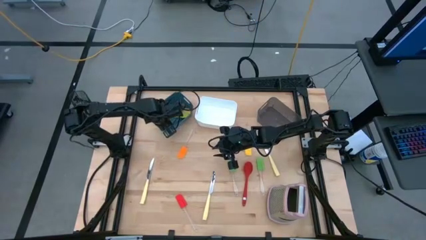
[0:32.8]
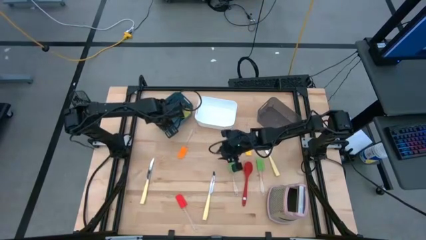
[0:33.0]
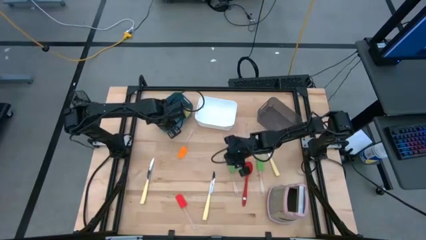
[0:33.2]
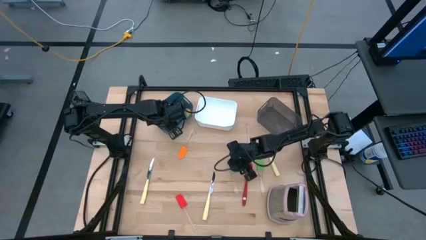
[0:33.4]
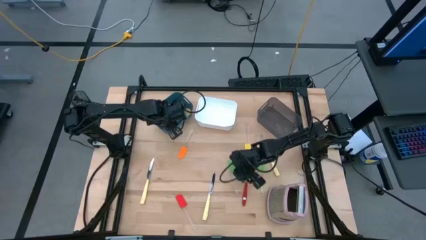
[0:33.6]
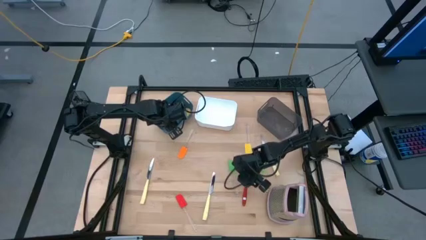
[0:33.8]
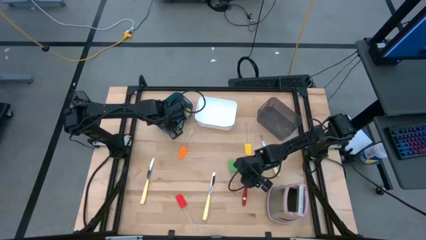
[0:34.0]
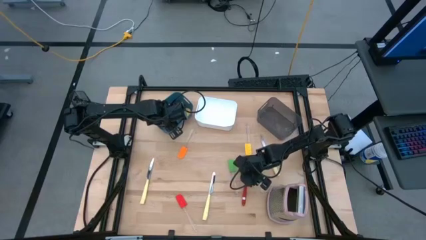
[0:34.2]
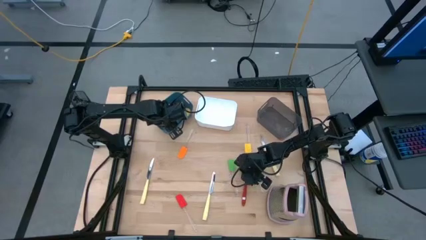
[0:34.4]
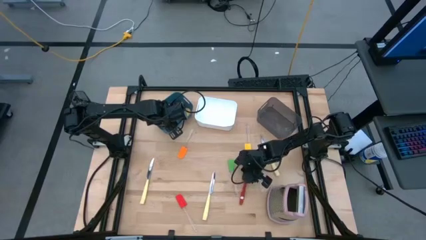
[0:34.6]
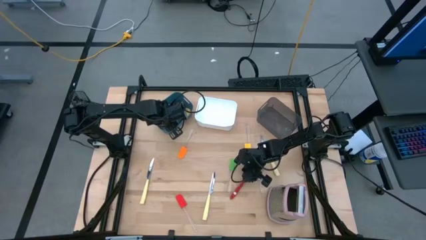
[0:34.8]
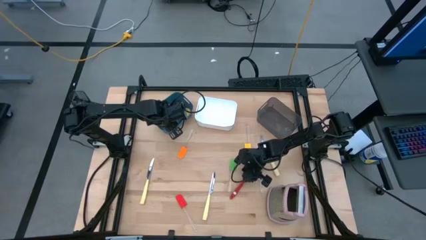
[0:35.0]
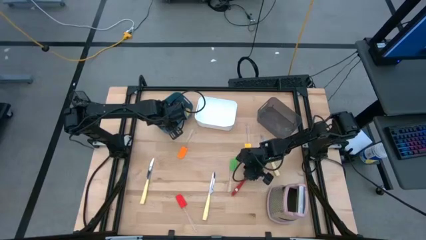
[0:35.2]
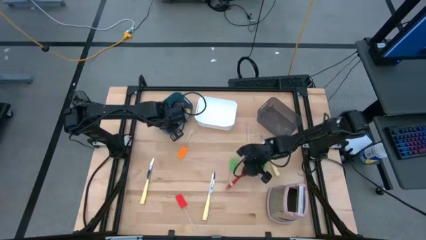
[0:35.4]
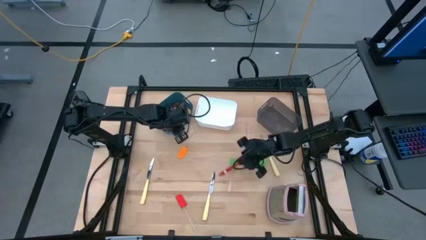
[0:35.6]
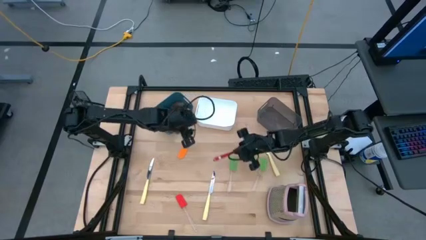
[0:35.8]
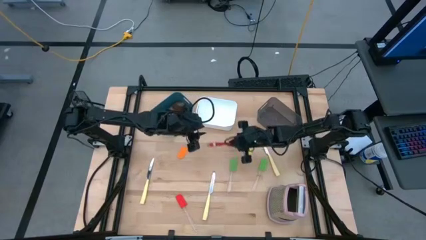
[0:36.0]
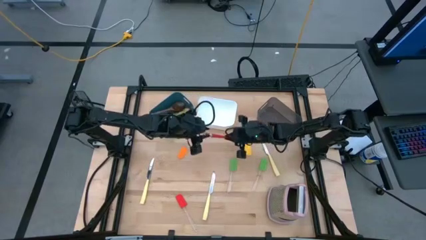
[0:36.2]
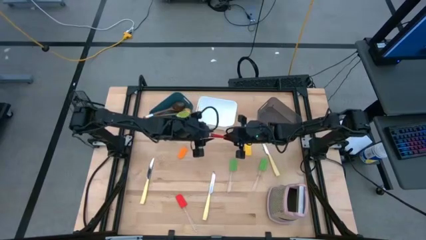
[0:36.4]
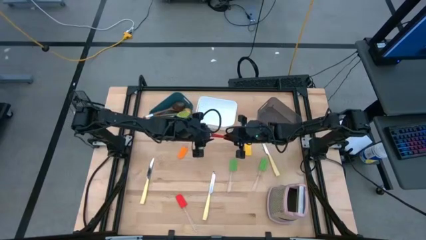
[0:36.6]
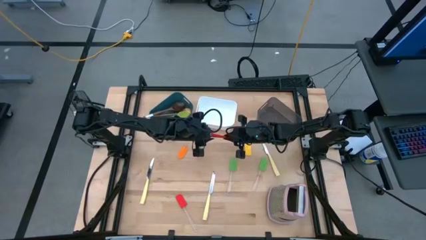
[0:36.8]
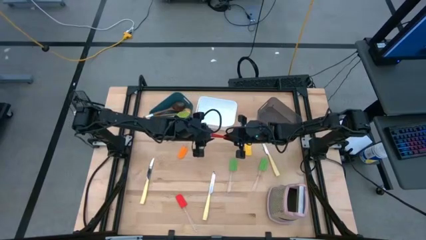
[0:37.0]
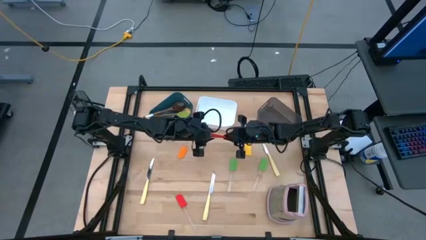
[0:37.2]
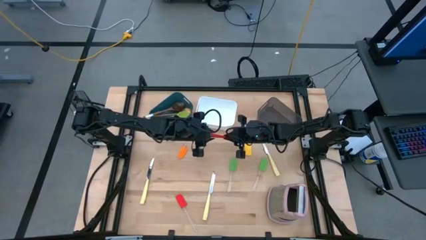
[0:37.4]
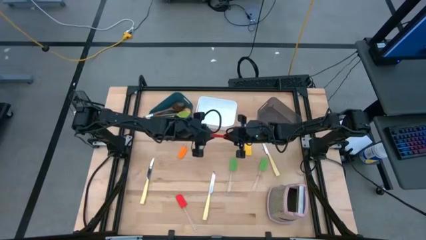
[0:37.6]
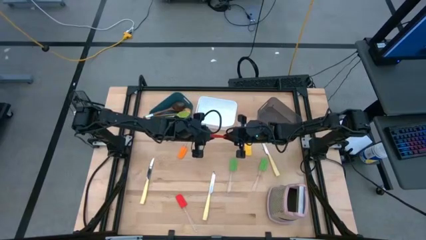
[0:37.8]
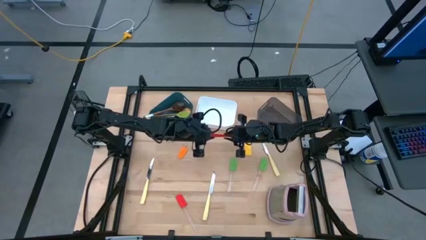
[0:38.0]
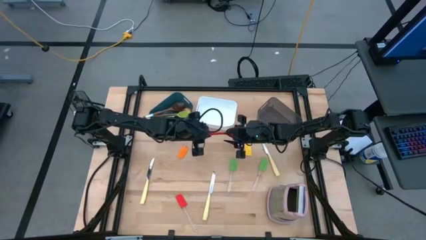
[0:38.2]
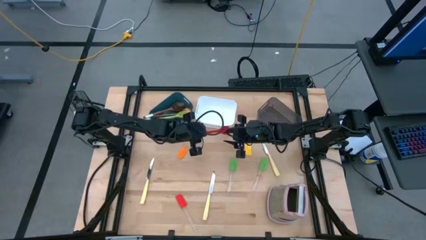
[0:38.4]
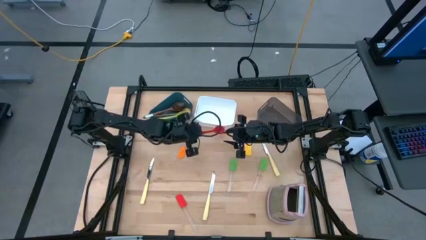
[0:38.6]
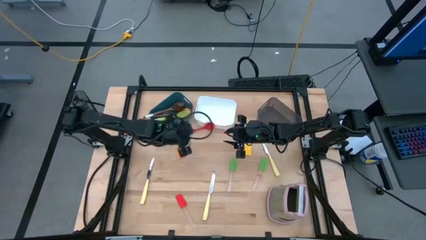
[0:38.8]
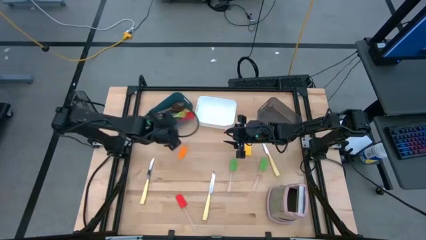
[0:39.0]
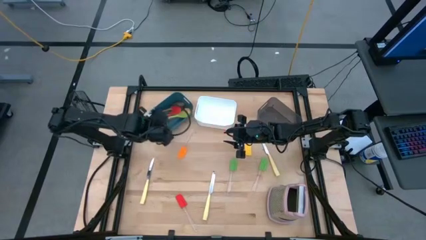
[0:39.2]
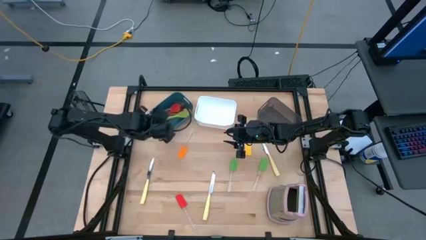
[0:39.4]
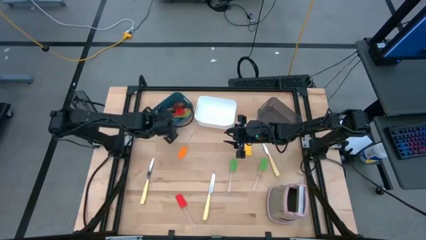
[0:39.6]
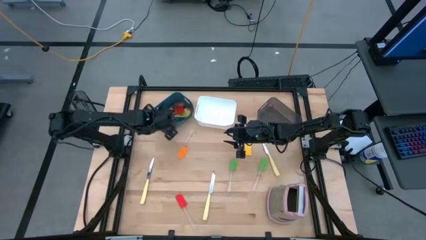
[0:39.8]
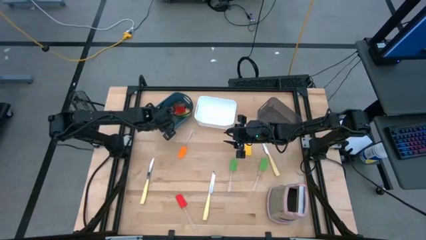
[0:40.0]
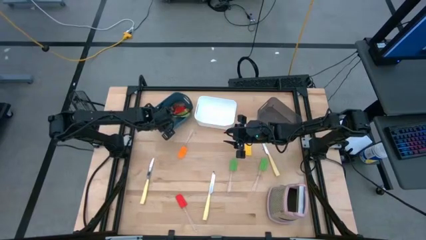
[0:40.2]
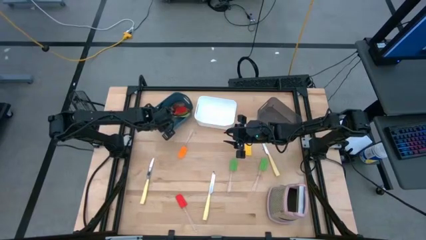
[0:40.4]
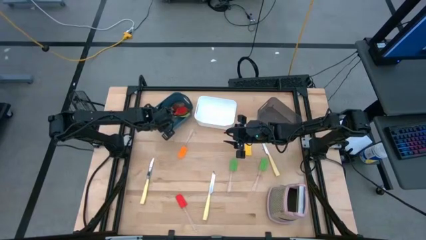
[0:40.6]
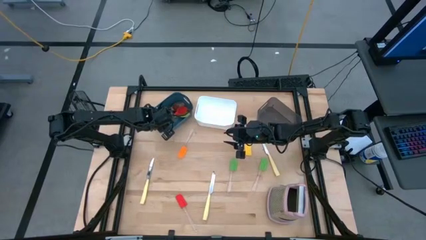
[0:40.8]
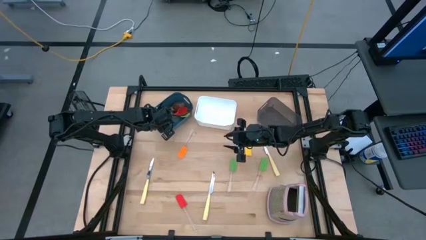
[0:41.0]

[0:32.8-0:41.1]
Task: Pick & Place Kitchen Items
Put the red serving spoon into the blue bin

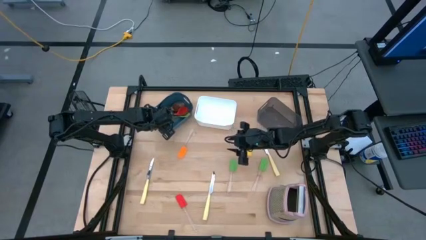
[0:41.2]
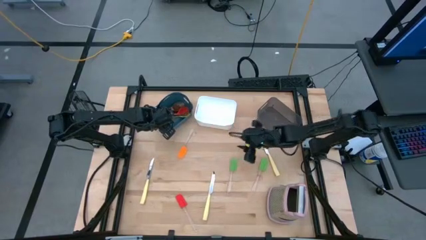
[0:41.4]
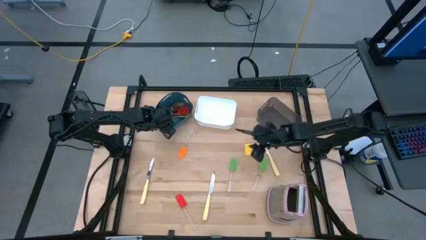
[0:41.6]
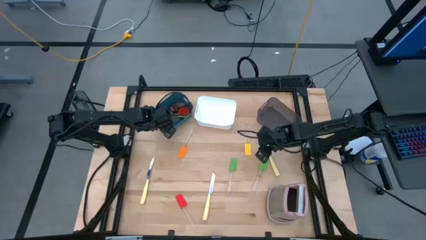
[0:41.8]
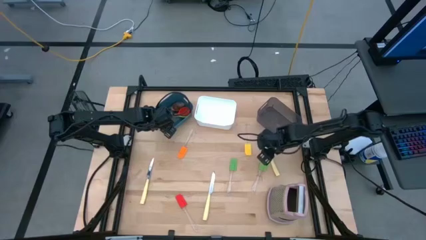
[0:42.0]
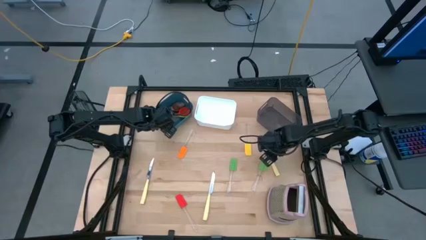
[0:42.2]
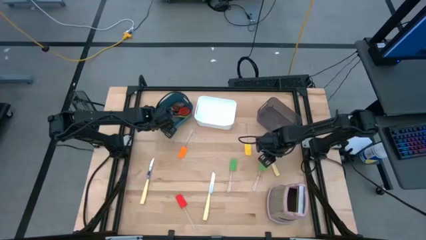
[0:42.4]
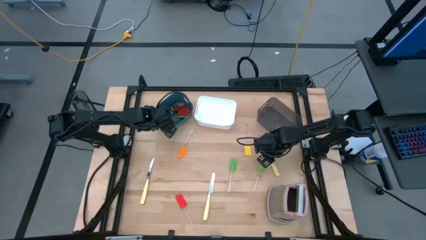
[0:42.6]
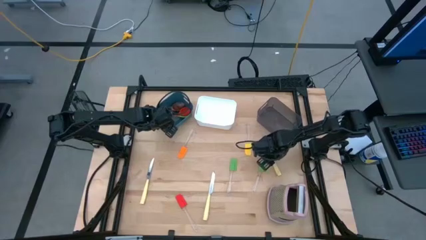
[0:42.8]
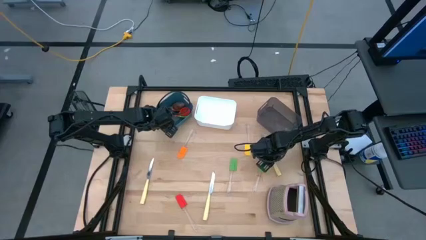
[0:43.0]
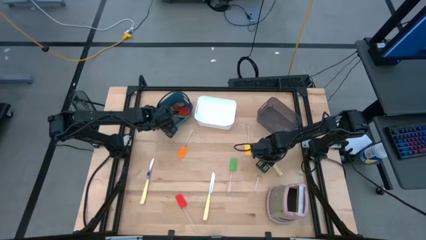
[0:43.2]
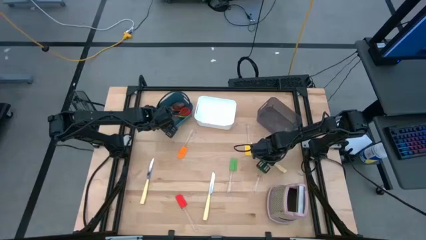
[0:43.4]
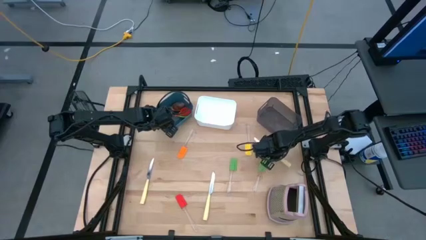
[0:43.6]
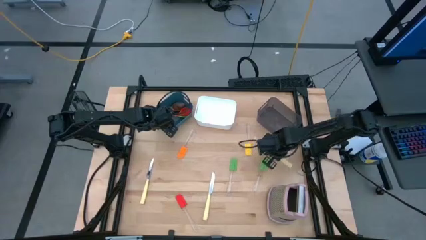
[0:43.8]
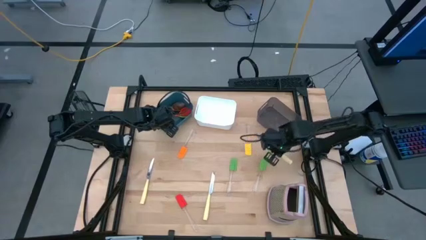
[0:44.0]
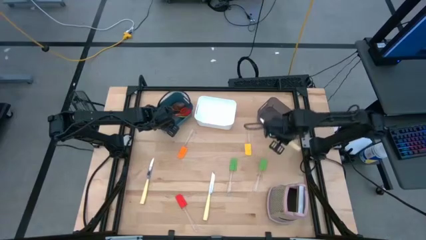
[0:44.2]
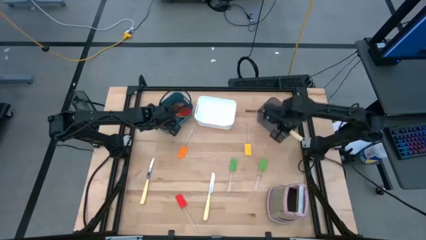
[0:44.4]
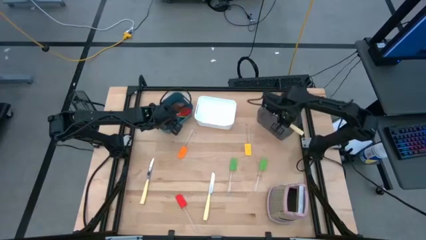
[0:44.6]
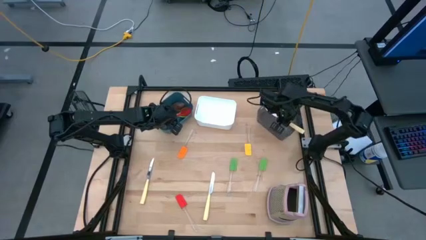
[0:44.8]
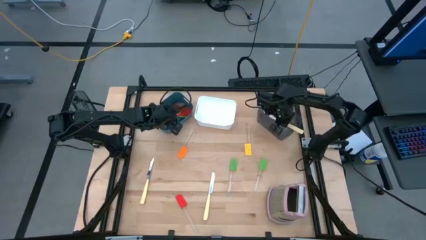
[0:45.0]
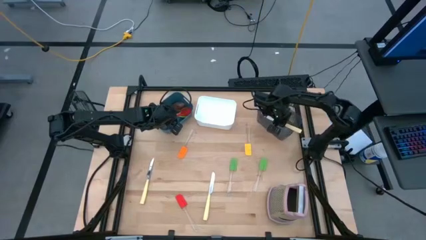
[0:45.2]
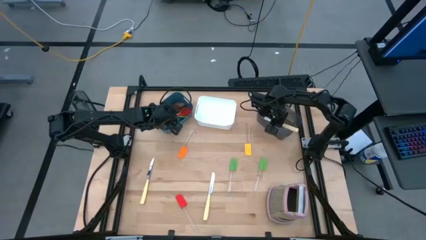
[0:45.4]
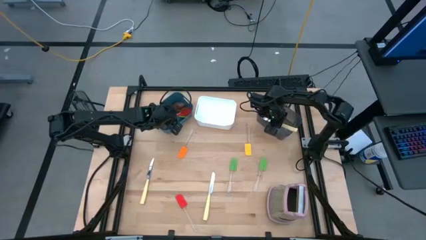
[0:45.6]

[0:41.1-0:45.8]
Put the right yellow knife into the black bin

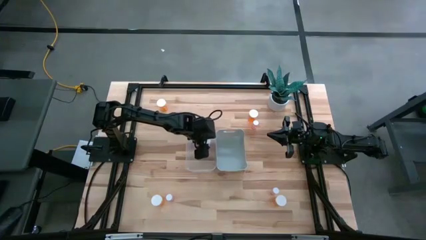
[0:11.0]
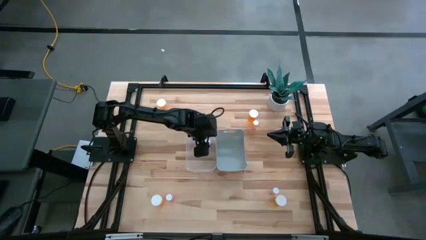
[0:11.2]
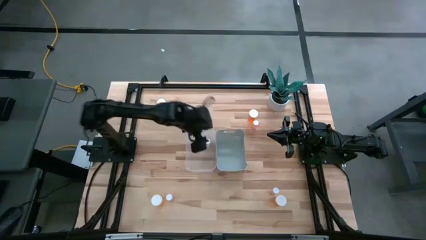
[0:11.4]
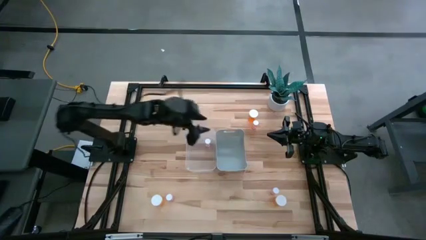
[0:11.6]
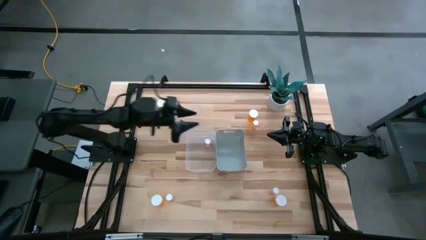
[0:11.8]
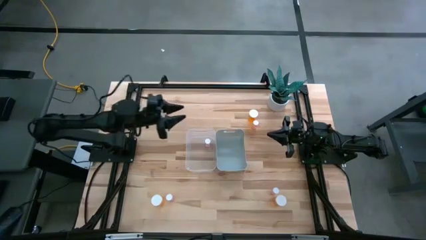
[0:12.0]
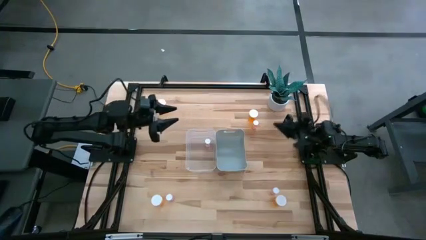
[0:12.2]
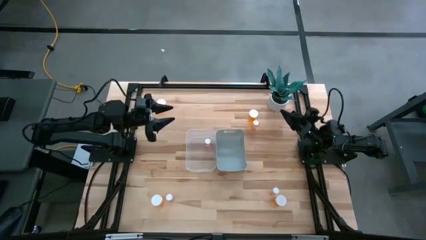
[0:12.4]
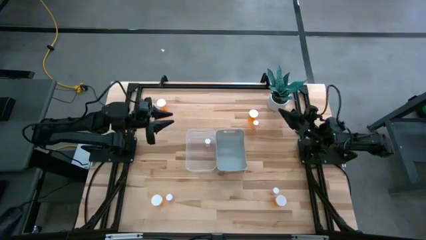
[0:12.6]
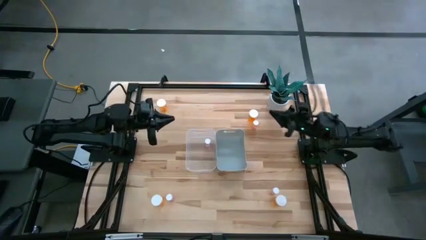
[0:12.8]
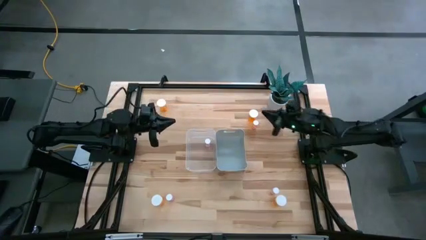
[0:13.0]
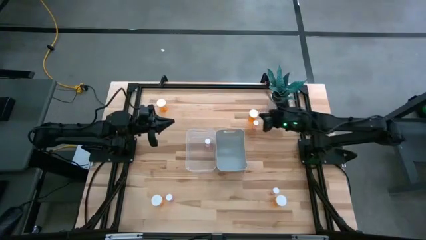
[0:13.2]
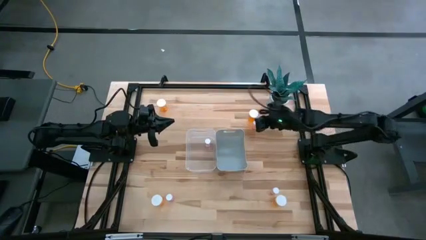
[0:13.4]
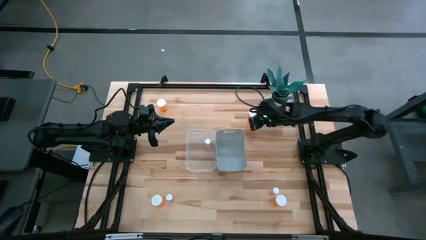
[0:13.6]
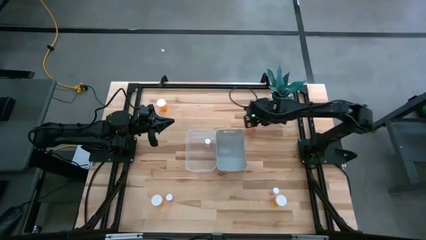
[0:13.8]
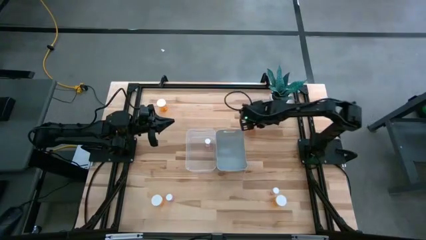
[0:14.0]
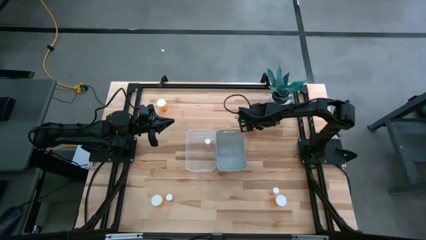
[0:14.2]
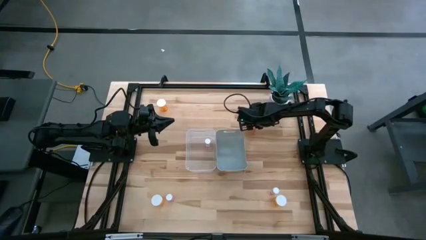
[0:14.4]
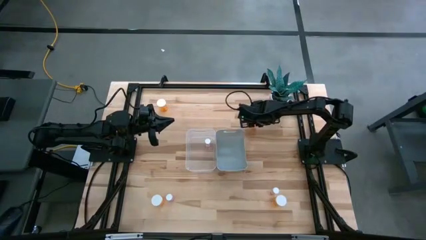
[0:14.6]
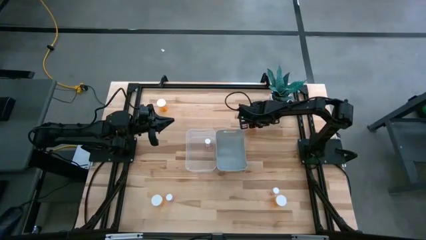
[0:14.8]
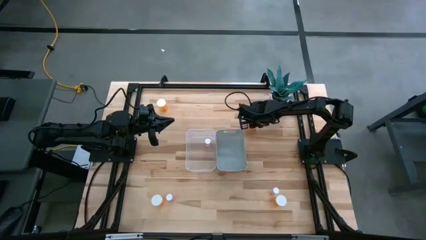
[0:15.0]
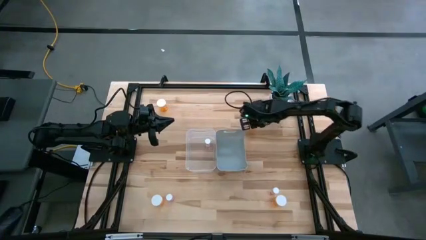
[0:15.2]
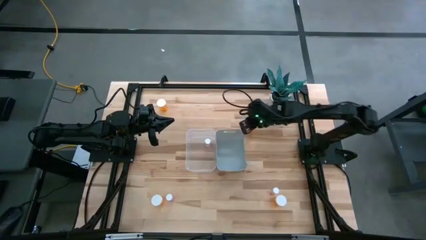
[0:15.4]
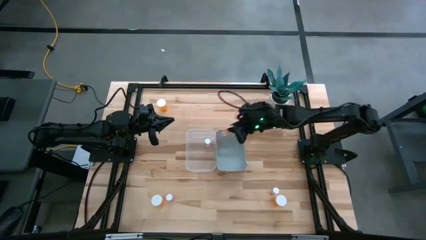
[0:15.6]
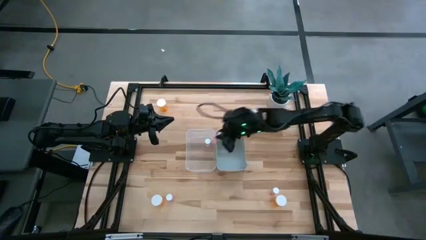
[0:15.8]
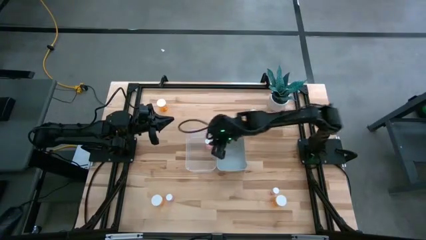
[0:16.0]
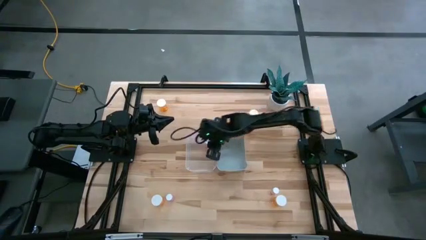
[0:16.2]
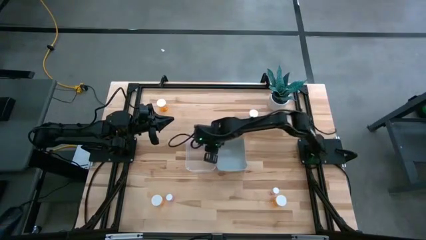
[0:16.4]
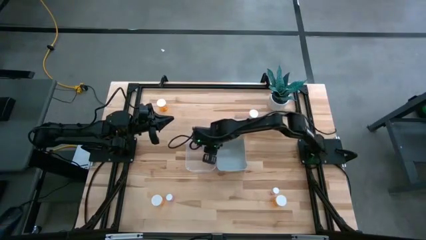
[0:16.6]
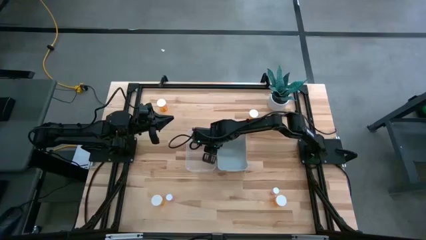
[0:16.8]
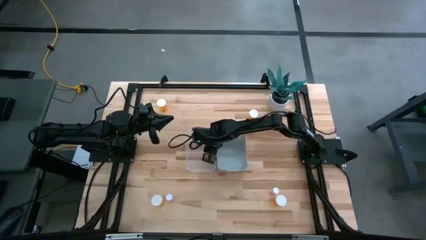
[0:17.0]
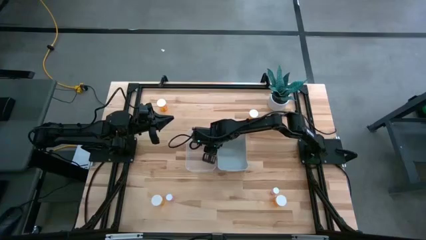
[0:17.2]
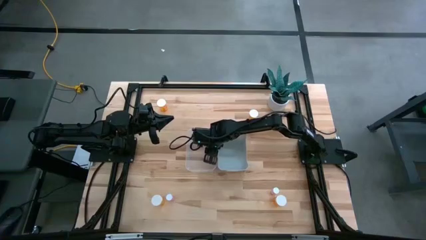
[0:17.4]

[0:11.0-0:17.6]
Task: Pick and place medicine bottles into bin by pill shape (circle, oval)
Put the small pink pill bottle into the transparent bin
